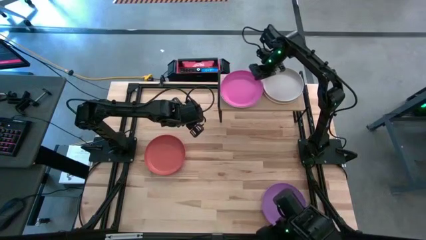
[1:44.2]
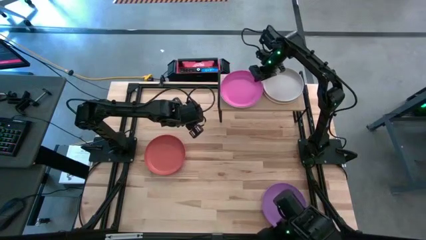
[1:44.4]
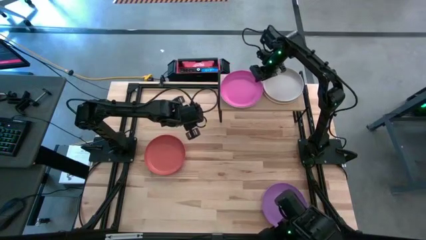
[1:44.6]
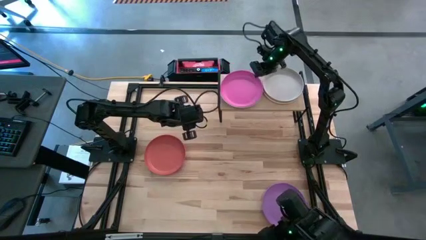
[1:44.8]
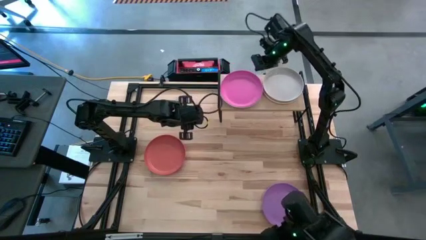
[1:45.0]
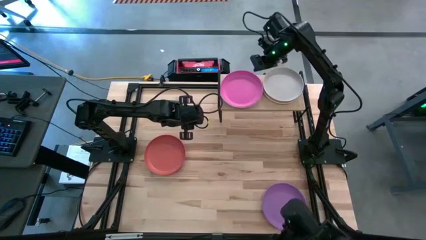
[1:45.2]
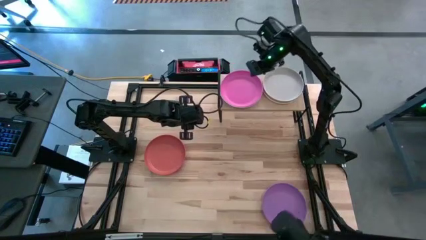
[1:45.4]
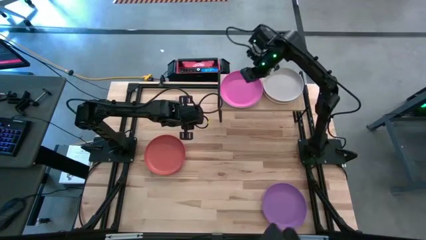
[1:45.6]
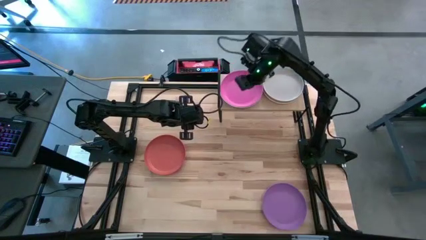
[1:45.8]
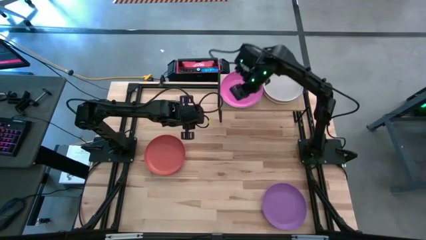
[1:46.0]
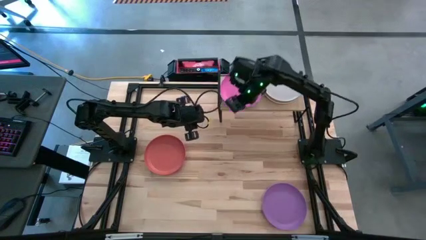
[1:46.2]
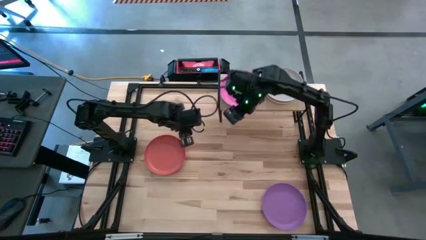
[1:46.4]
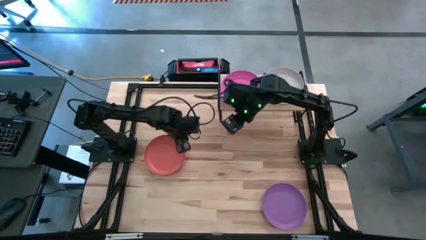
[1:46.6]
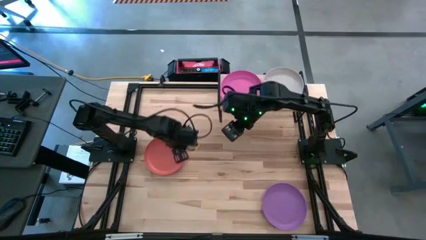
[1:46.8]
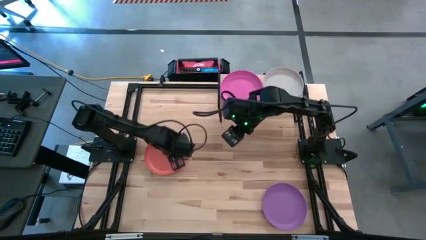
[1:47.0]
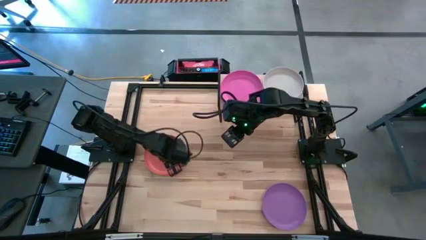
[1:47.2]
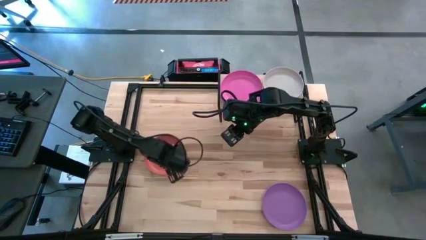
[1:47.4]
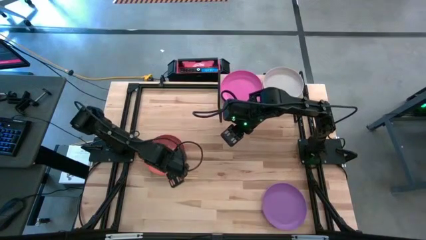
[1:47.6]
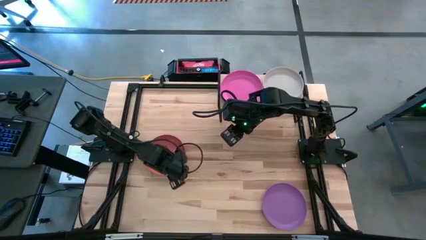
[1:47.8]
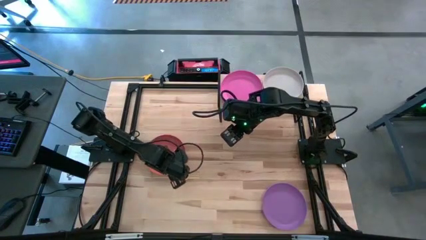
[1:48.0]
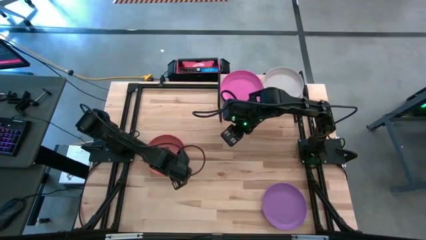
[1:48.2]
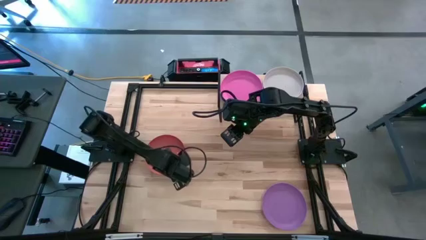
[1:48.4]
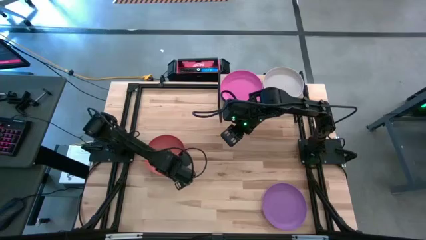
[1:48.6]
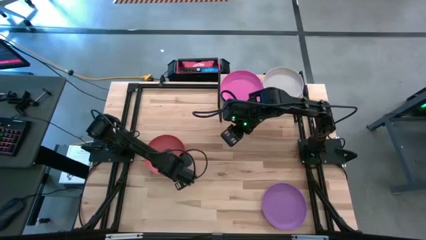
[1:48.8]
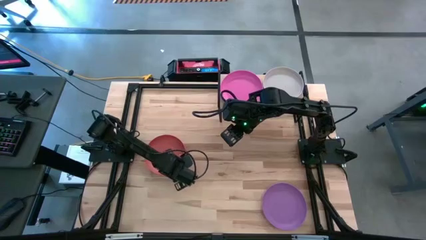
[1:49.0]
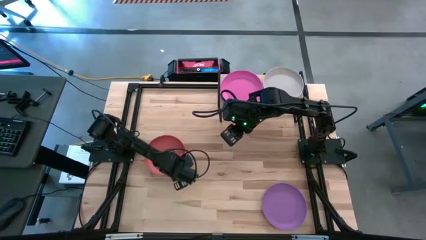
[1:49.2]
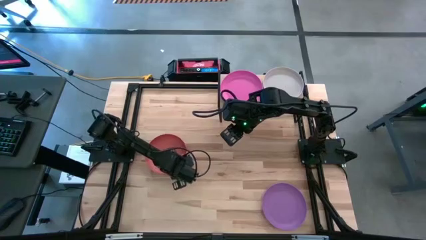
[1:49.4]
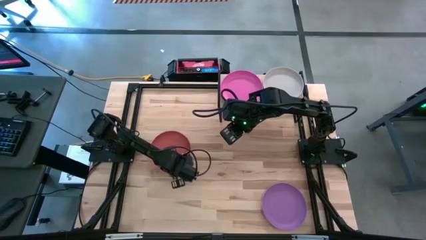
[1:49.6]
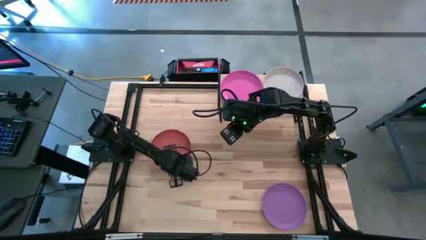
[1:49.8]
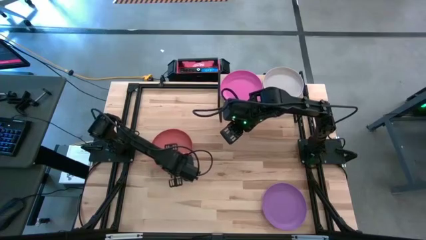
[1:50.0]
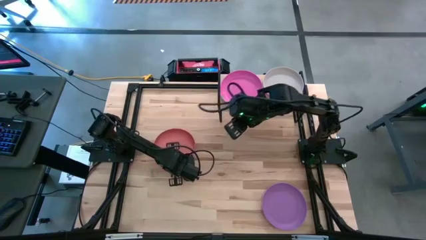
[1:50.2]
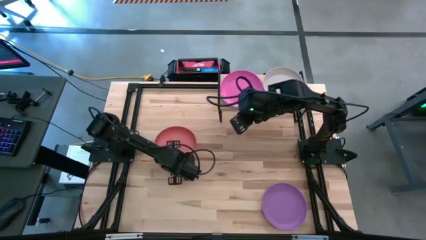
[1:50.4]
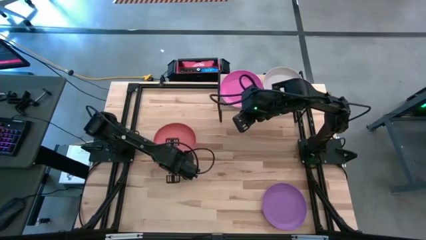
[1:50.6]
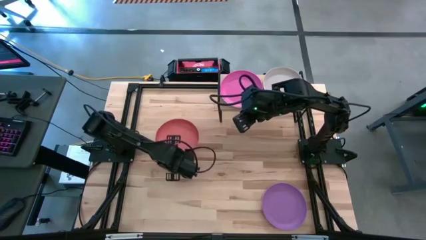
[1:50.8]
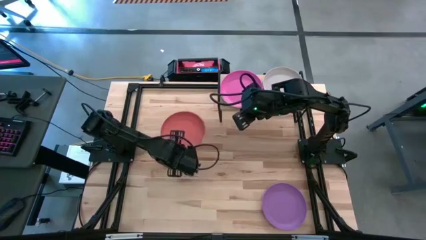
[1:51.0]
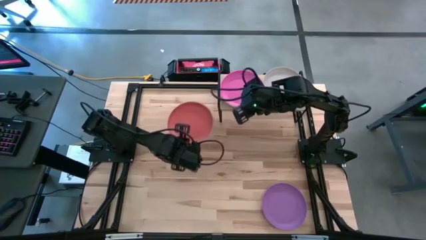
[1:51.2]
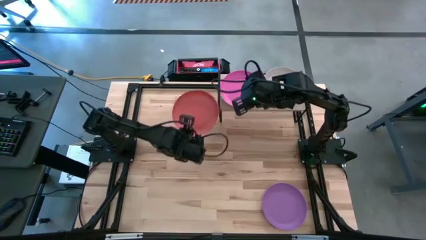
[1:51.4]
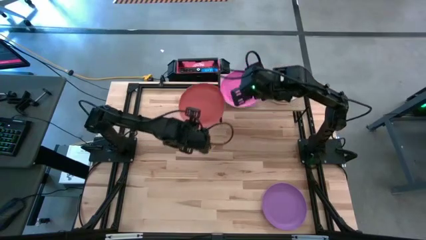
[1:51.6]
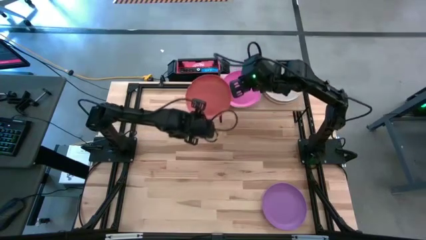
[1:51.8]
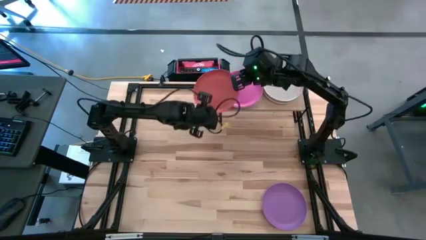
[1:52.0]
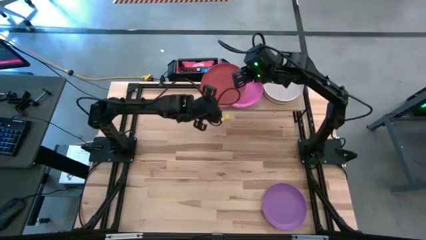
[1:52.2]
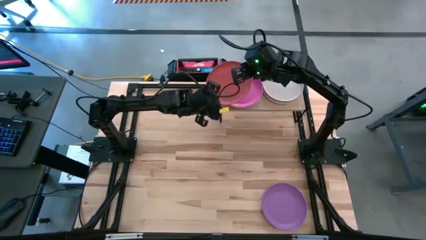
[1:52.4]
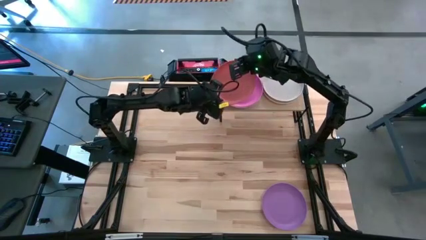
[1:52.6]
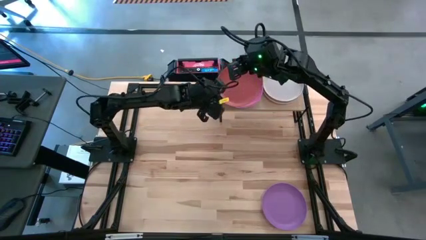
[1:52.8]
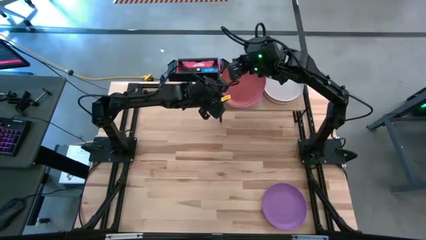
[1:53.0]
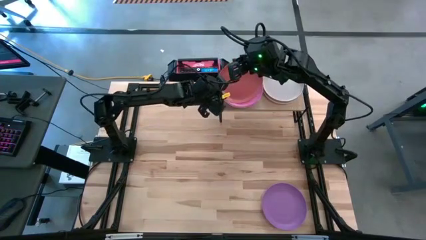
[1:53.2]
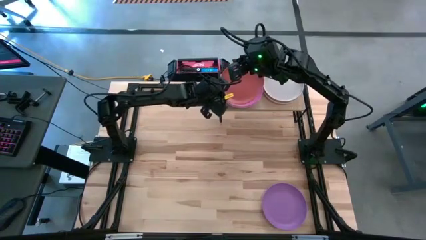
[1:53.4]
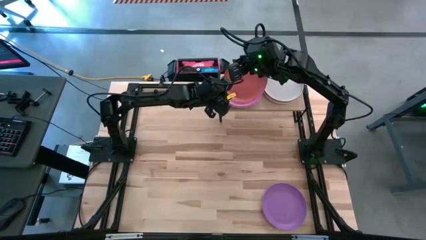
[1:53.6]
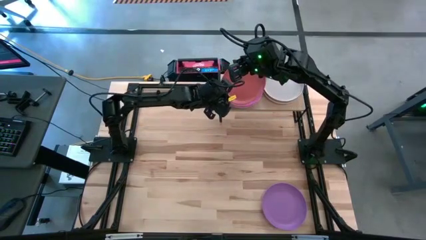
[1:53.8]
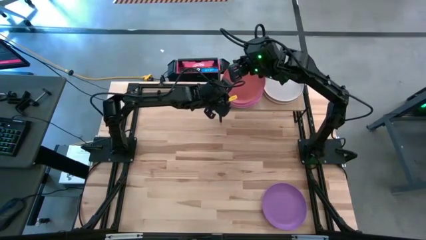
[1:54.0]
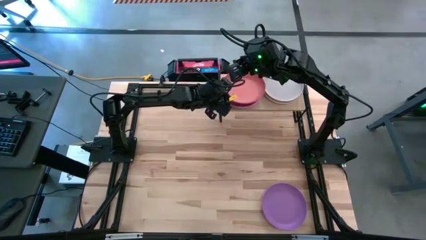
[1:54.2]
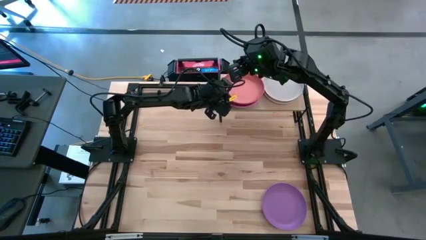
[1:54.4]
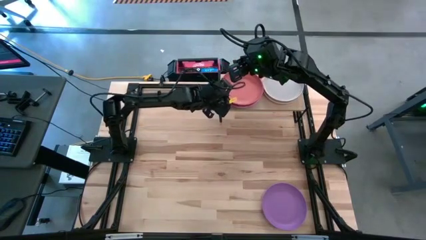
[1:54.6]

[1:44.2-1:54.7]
Task: Place and stack plates onto a shelf
Stack the orange plate on top of the pink plate on the shelf

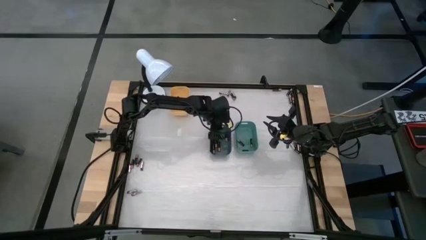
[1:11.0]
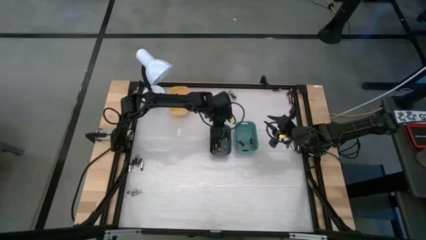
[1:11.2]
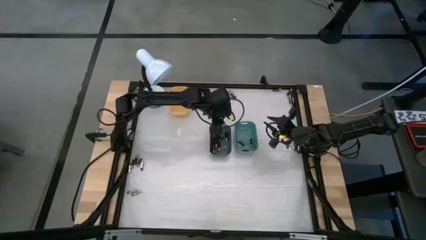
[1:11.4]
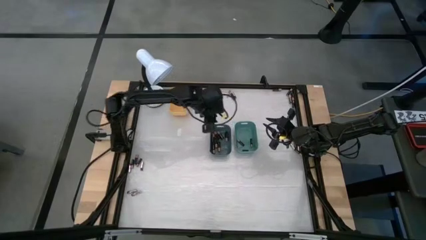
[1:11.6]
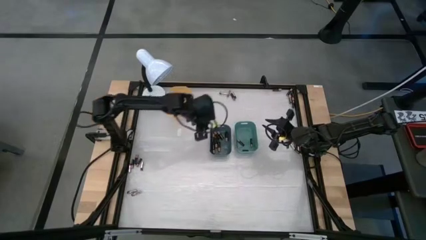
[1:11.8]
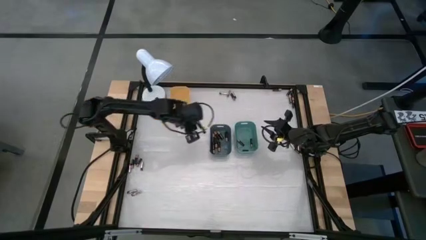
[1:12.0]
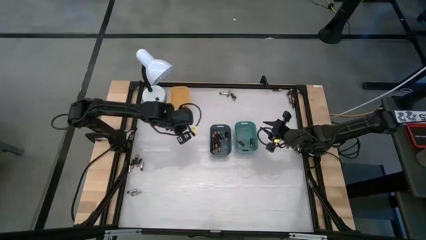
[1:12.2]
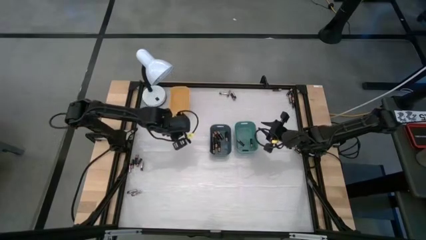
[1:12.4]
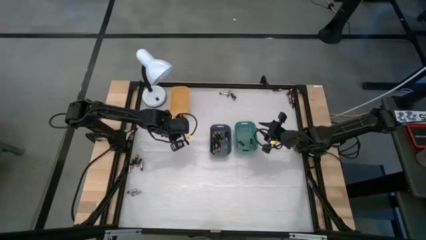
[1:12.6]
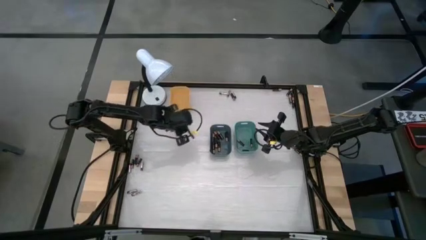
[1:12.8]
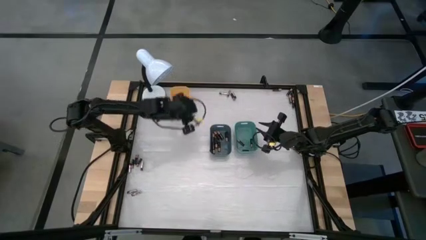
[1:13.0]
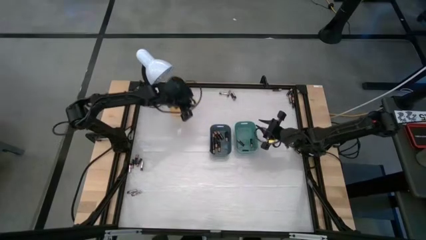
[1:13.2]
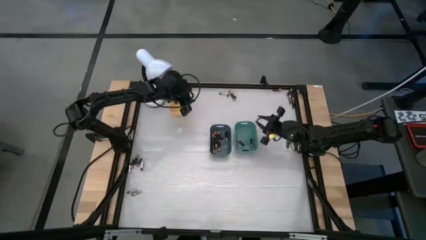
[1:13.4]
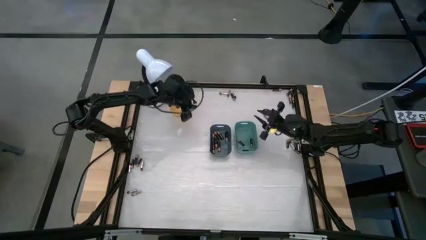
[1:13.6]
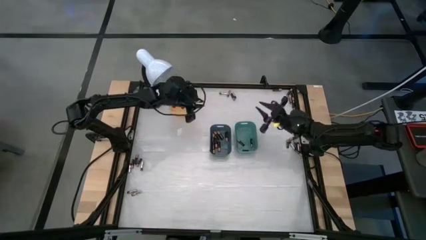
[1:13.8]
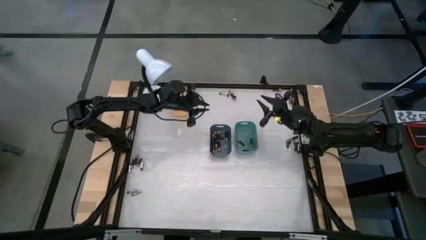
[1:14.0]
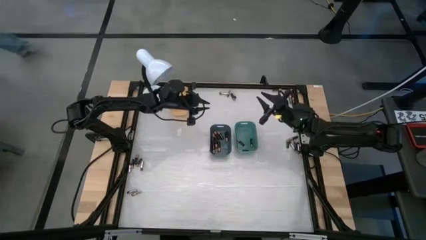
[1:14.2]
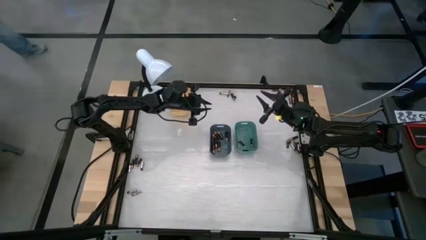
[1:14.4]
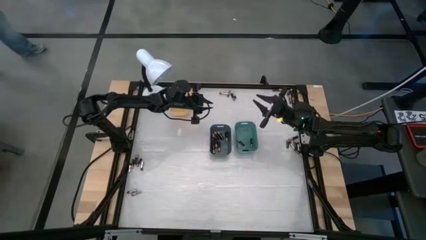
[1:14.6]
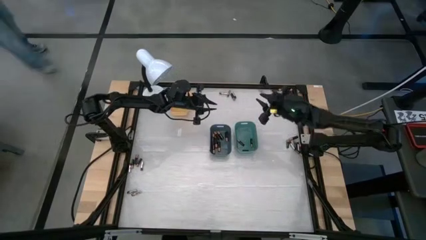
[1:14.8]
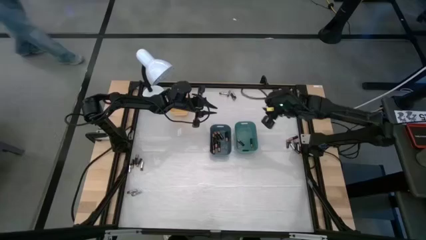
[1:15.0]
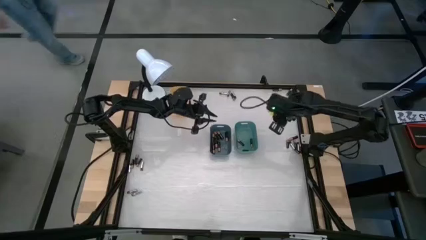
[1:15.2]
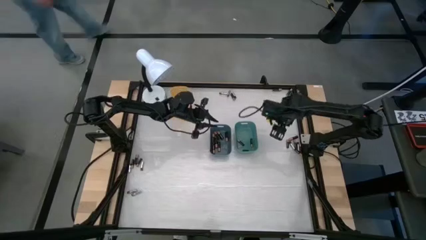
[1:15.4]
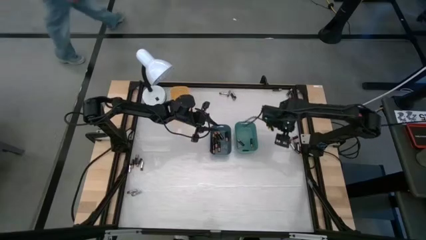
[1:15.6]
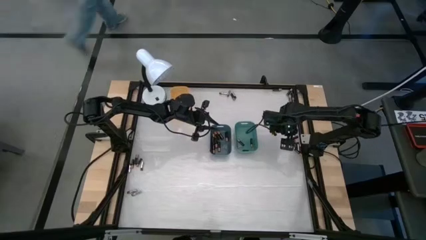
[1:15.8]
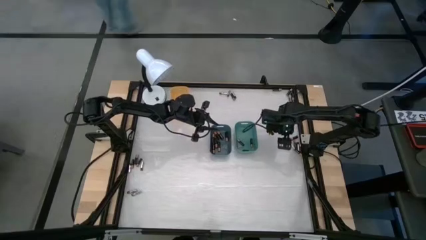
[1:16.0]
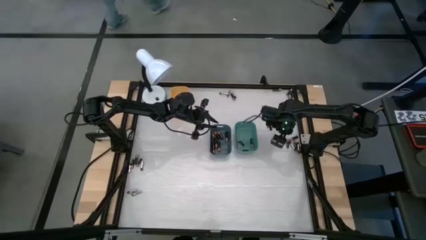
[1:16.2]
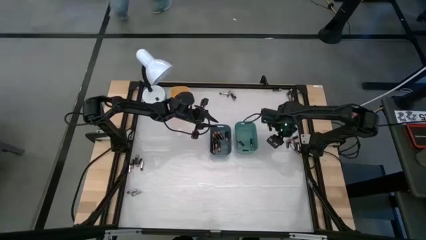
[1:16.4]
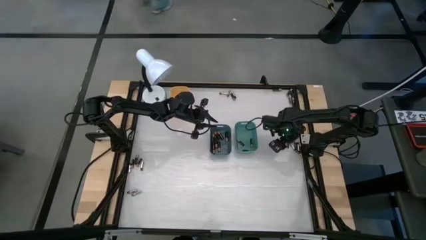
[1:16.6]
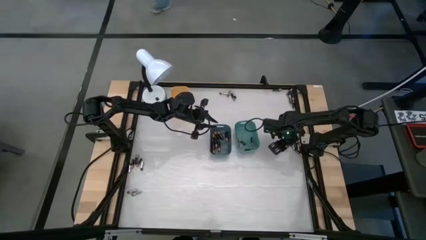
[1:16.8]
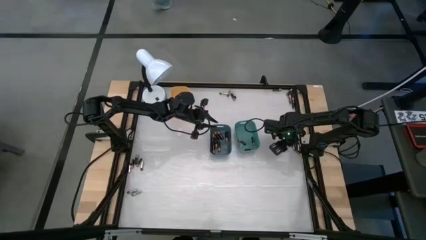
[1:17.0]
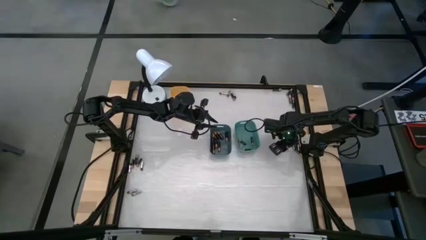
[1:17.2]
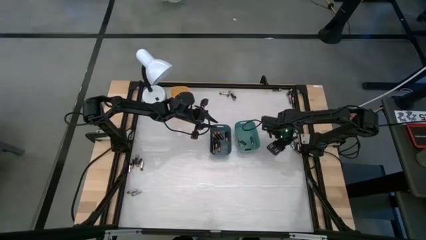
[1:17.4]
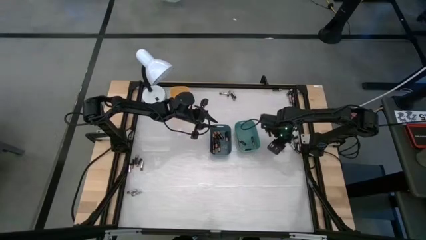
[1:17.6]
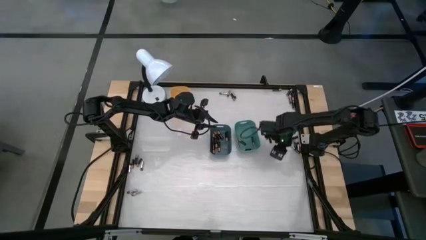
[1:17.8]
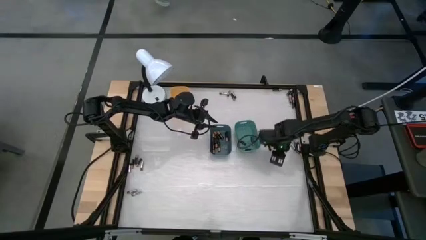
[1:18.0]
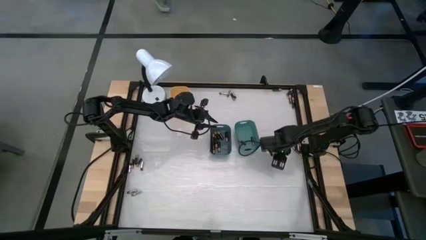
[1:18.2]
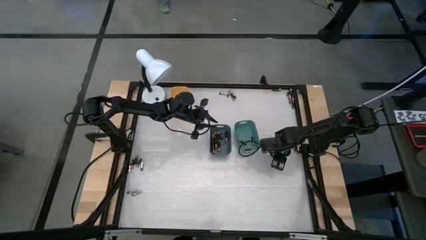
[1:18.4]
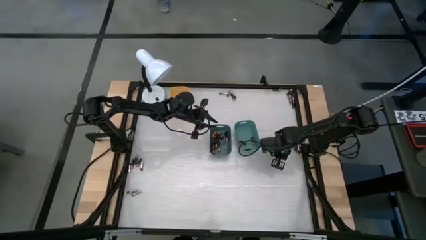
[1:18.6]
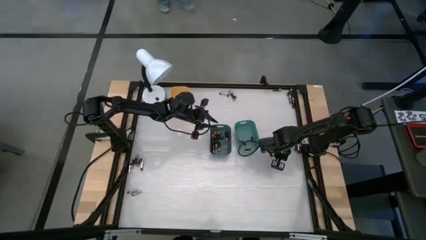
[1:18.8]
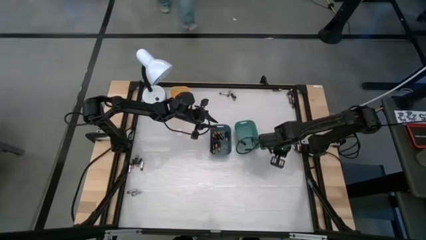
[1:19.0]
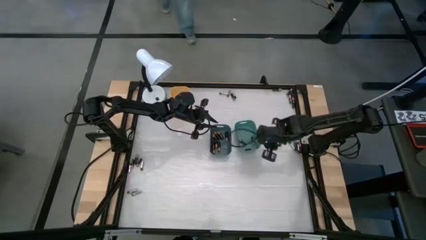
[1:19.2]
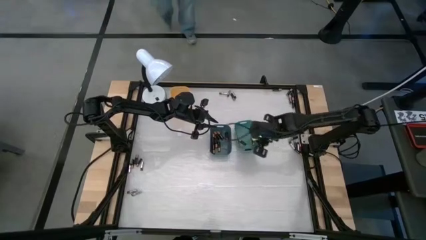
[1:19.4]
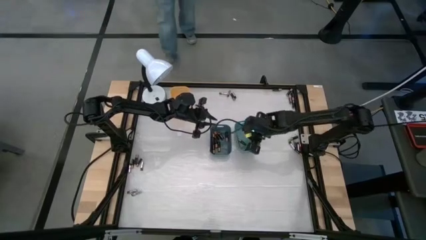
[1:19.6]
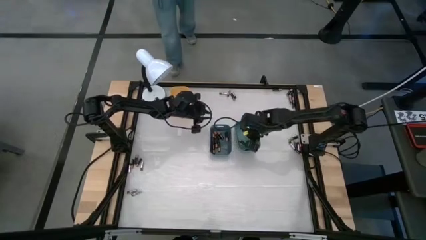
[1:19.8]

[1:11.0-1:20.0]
Task: Sort batteries
Put the black battery into the green bin
